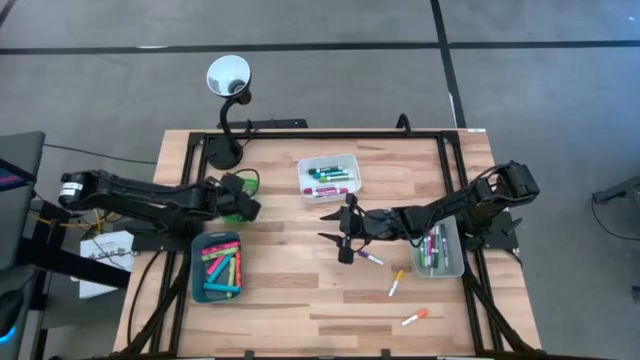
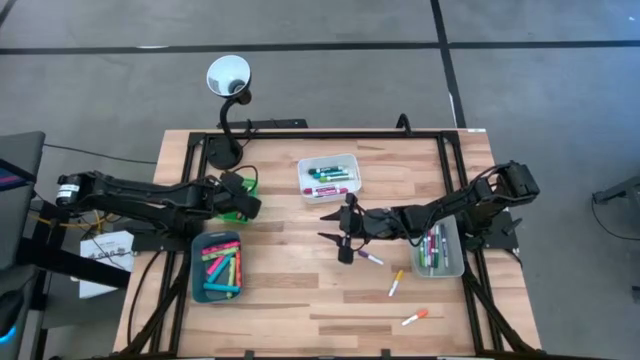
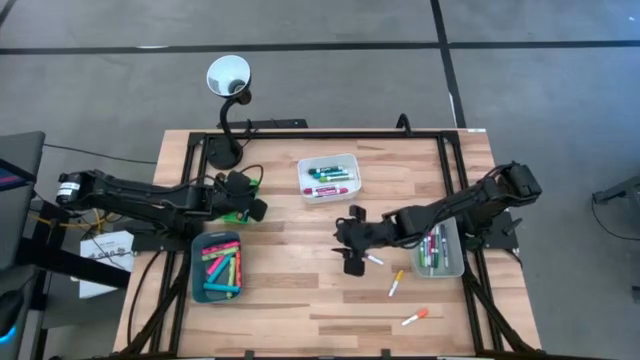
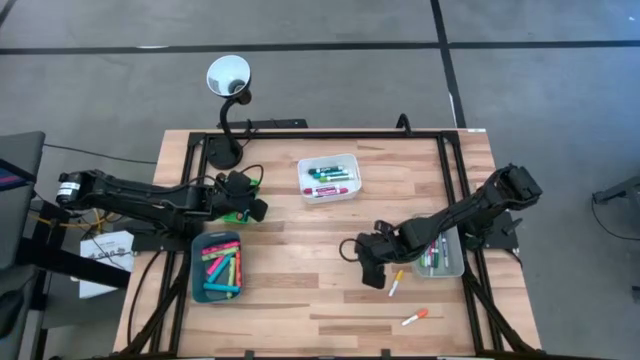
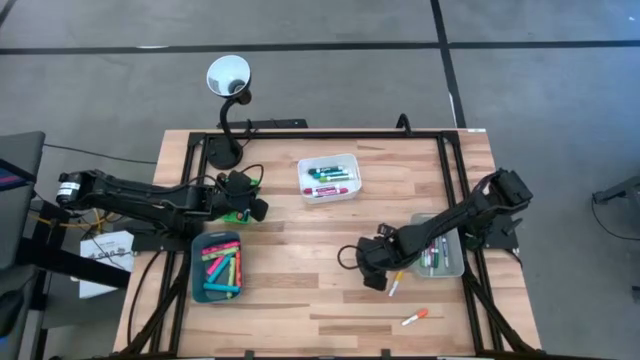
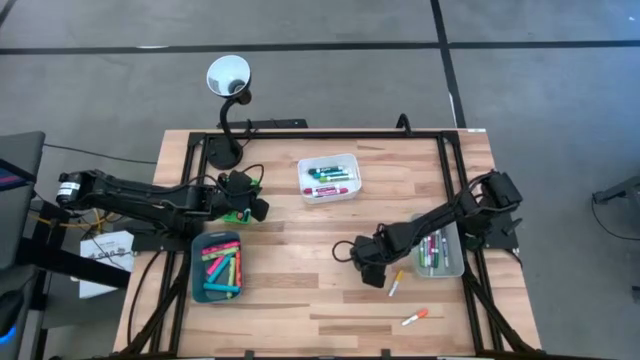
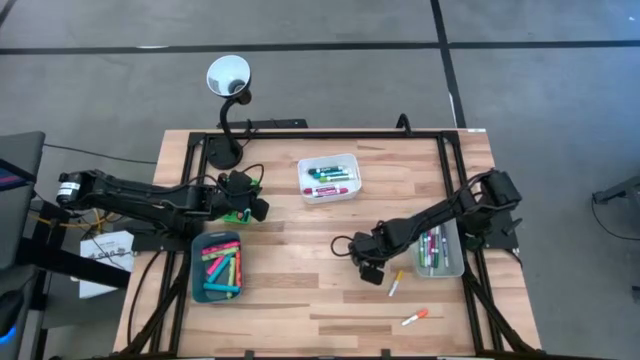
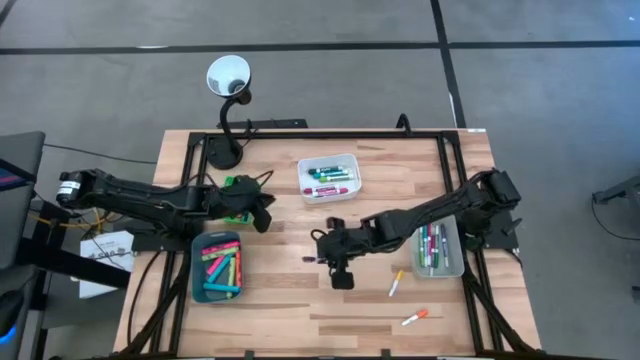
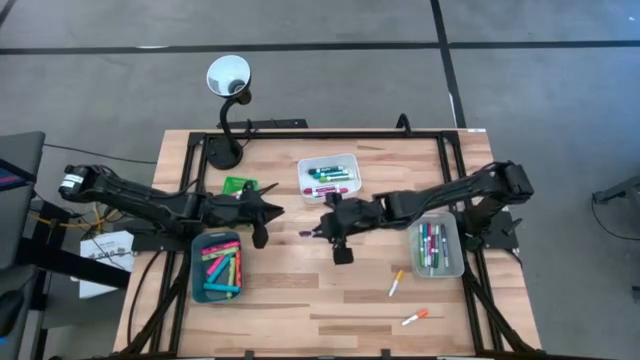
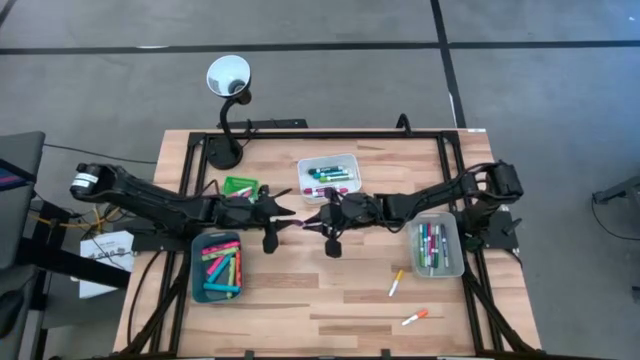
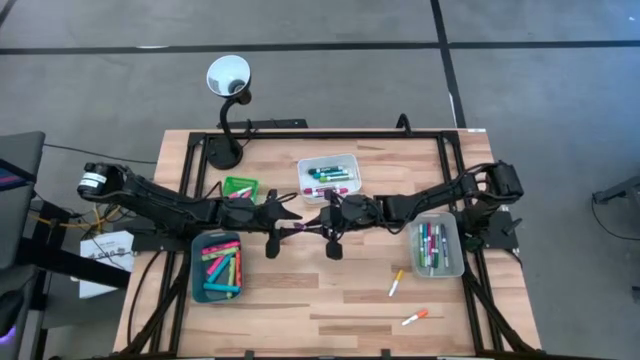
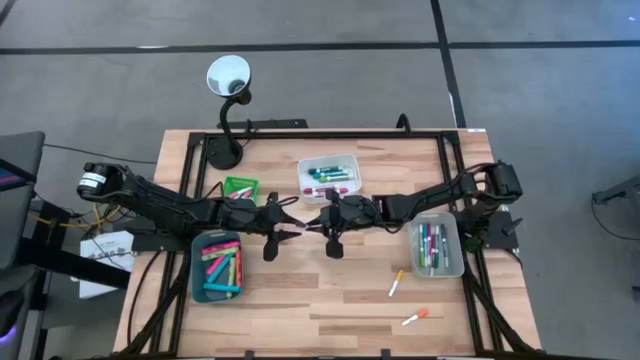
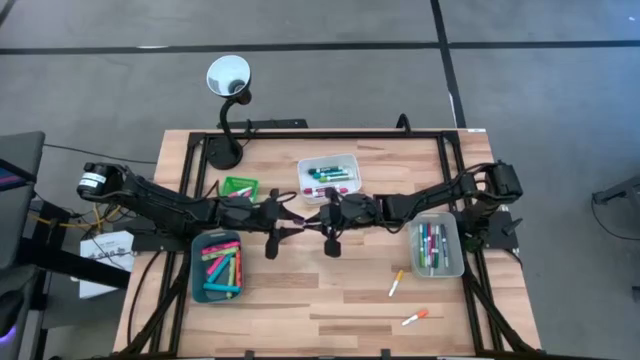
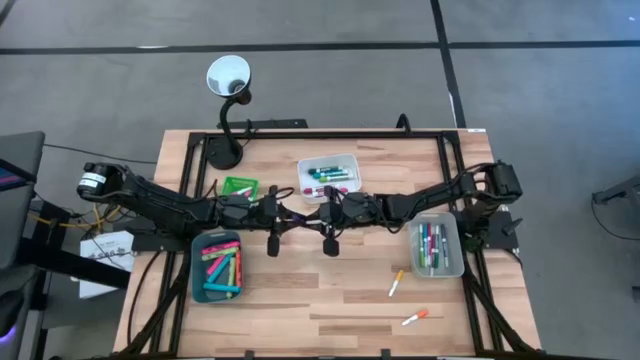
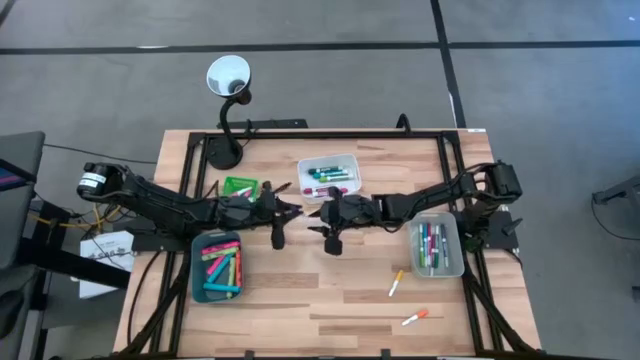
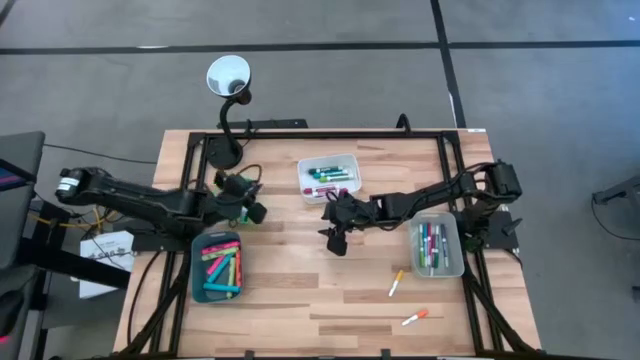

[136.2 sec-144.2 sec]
Task: Pick & Place Markers
Put the small violet highlighter pen into the green bin

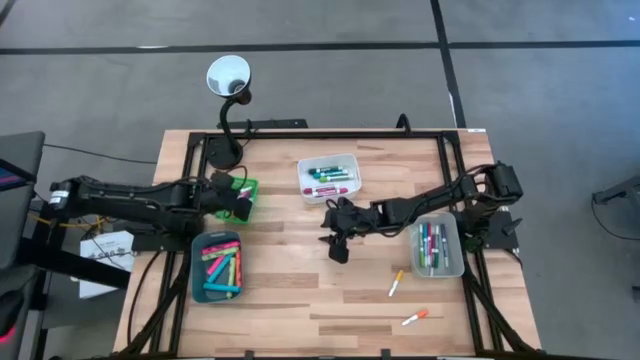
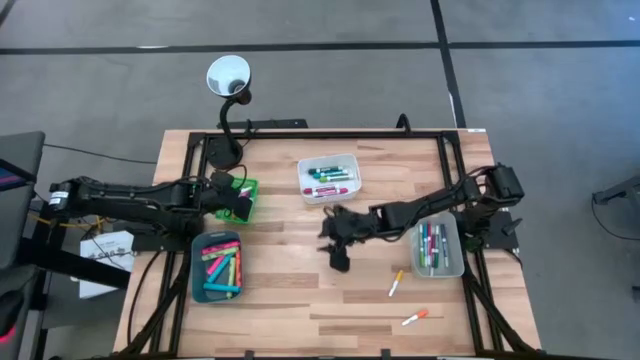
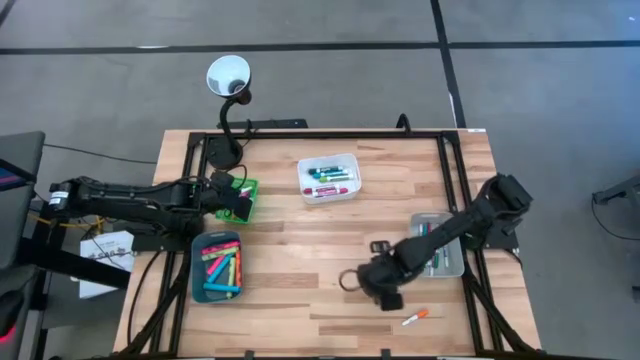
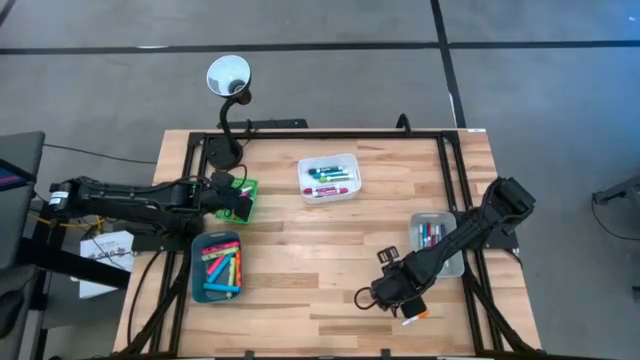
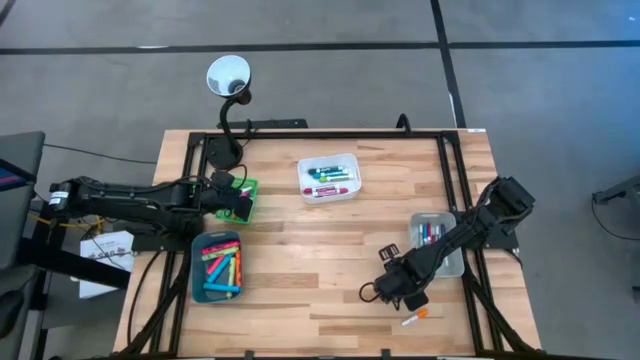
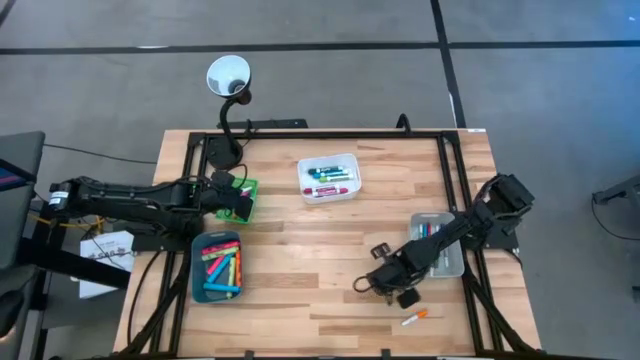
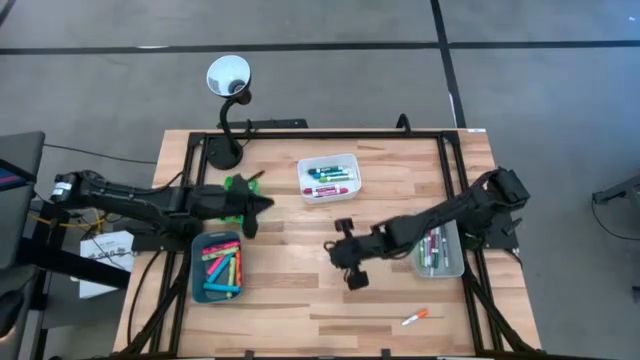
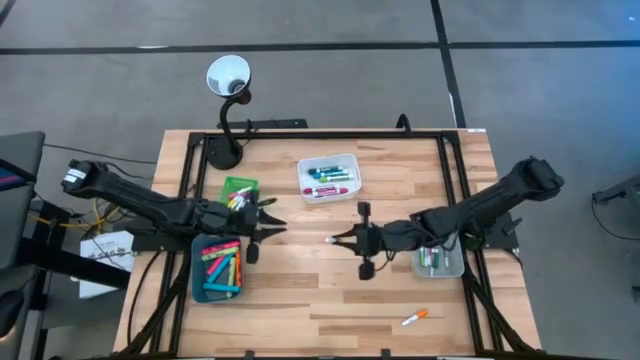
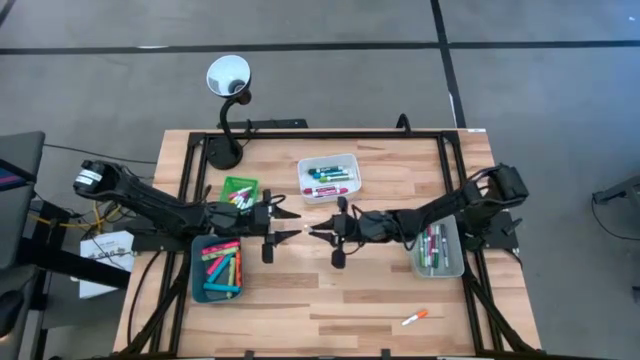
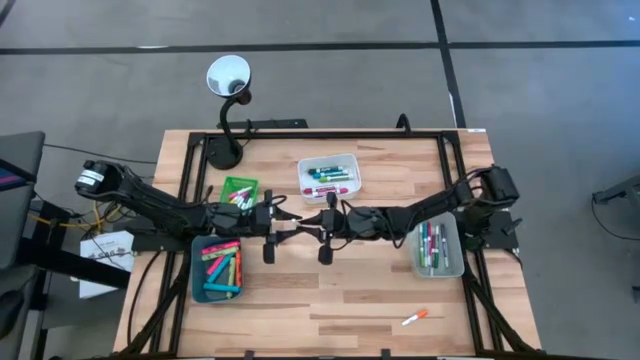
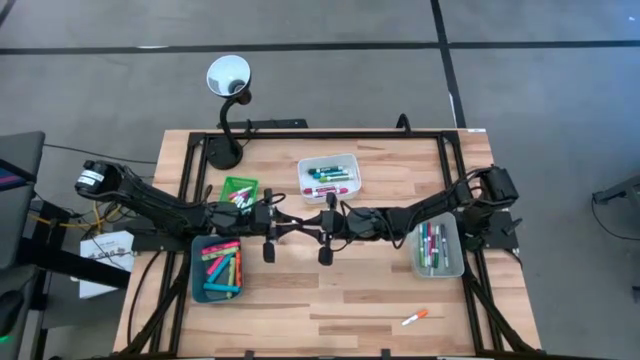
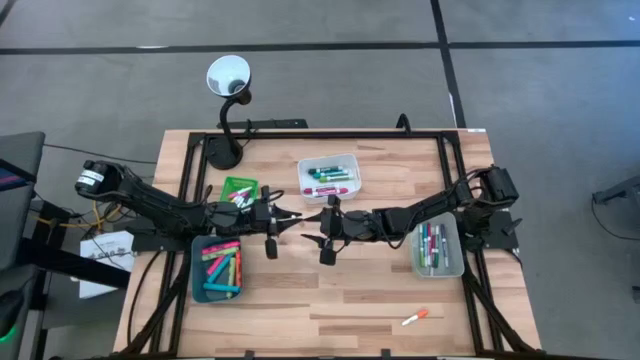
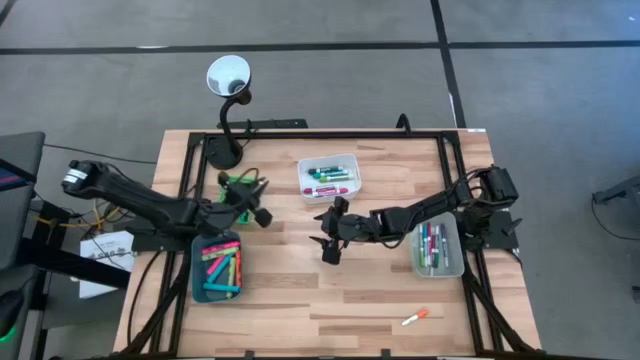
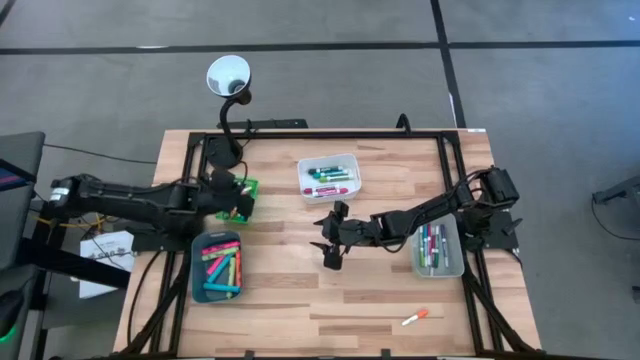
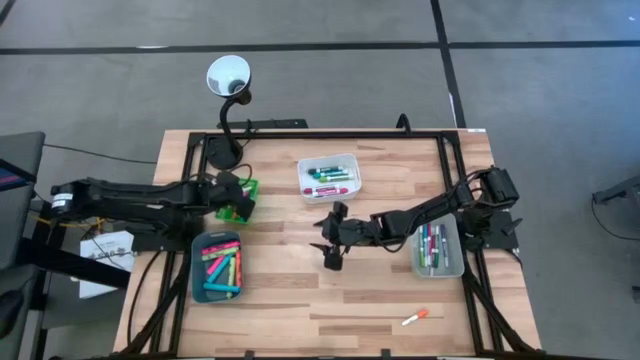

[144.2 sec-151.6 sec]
Put the small yellow highlighter pen into the green bin

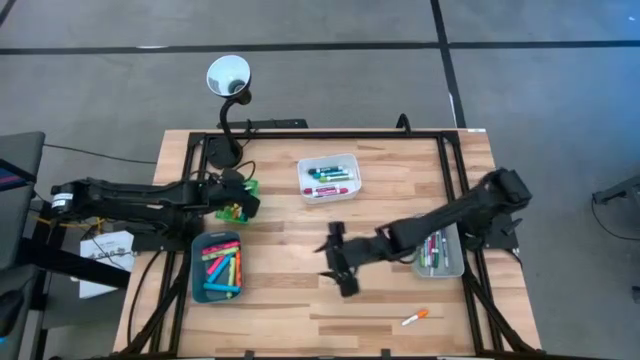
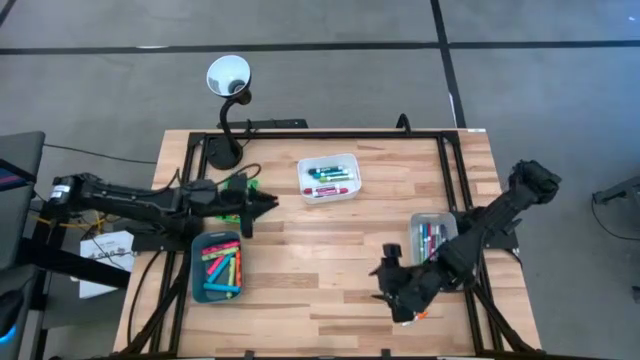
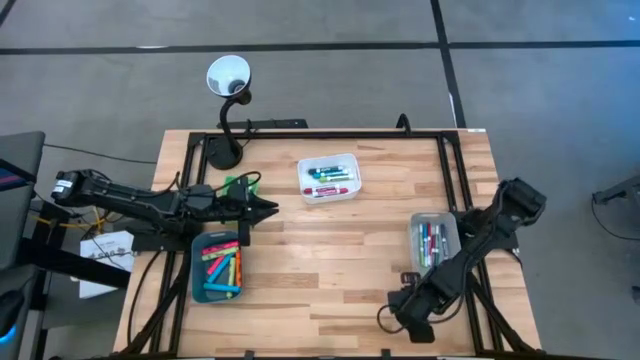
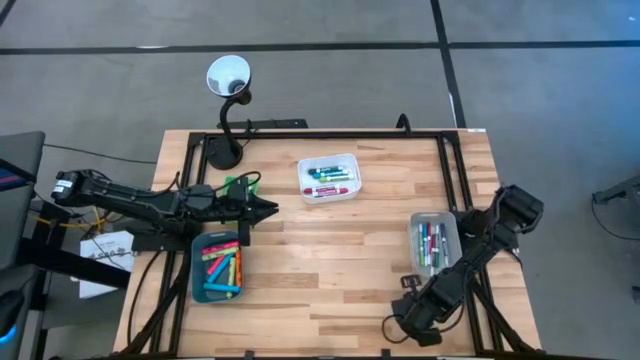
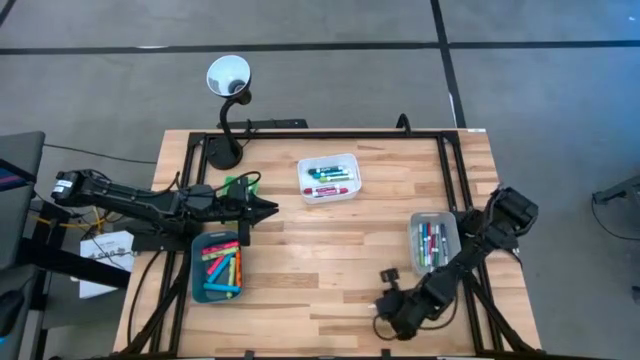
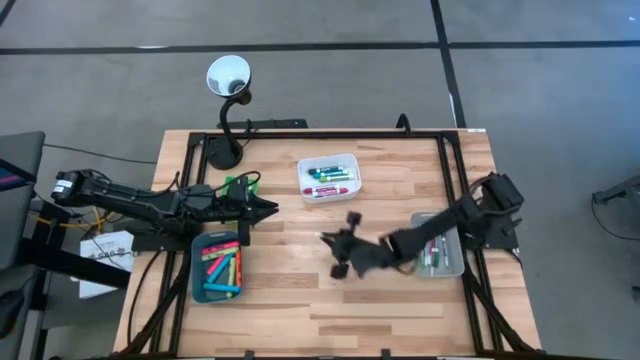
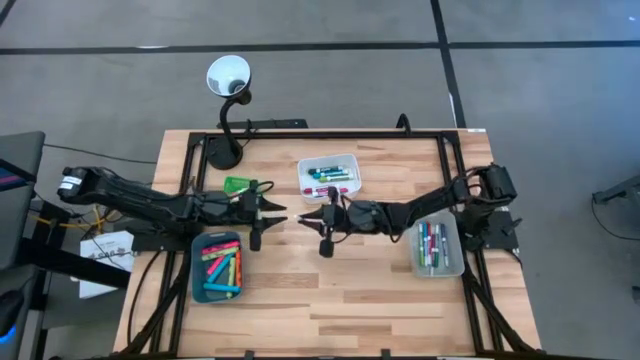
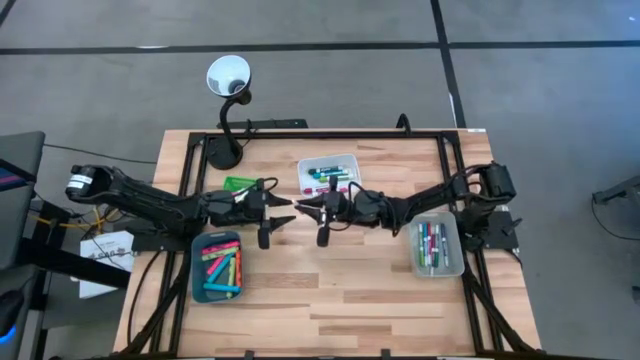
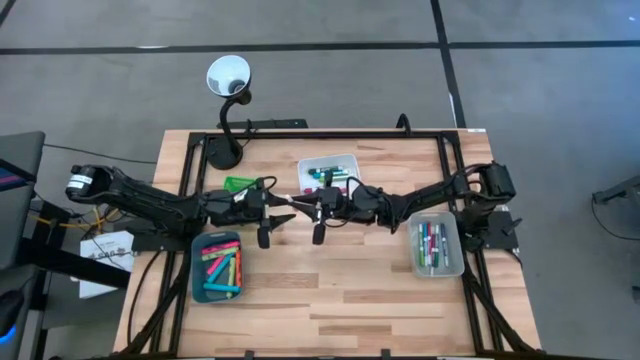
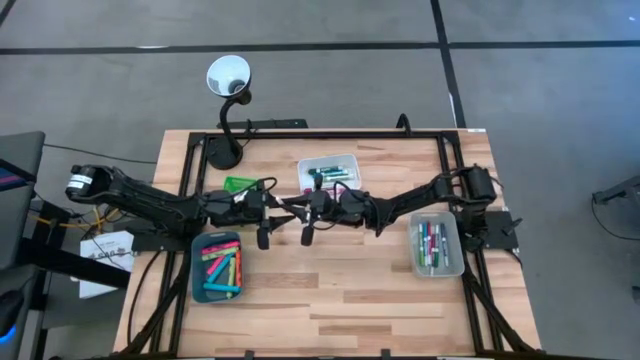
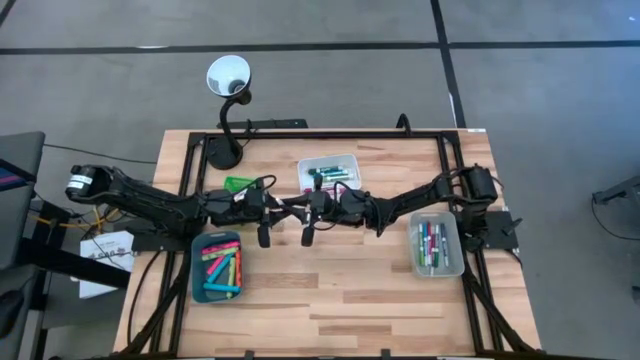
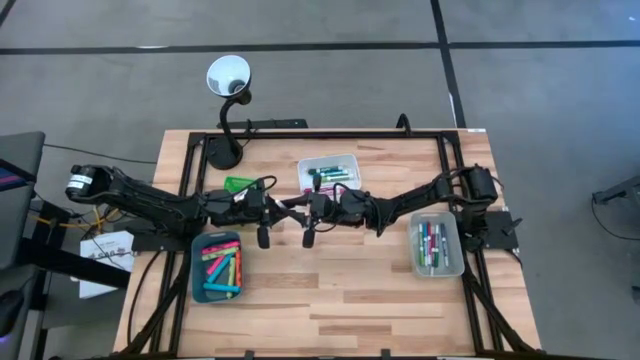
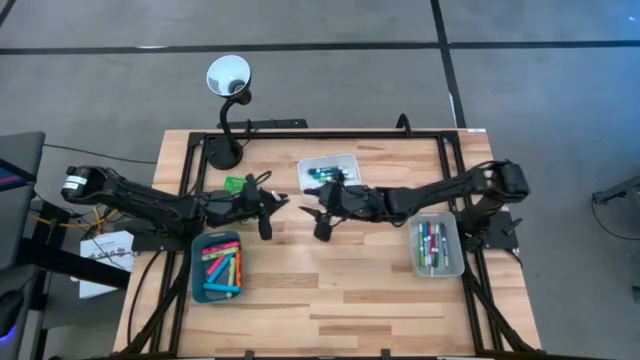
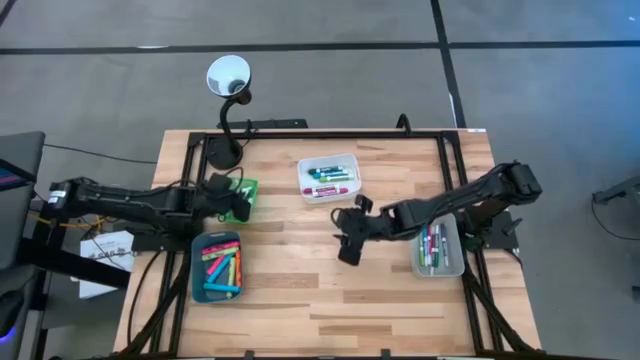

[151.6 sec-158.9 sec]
Put the small orange highlighter pen into the green bin
